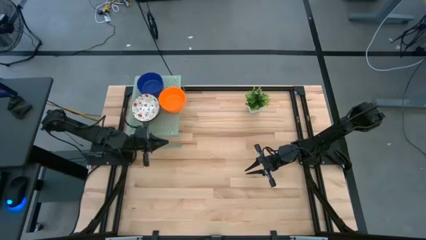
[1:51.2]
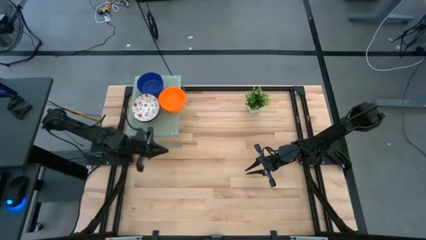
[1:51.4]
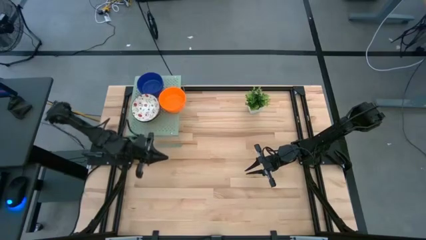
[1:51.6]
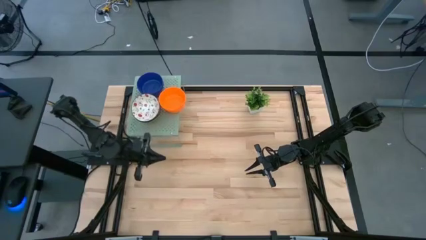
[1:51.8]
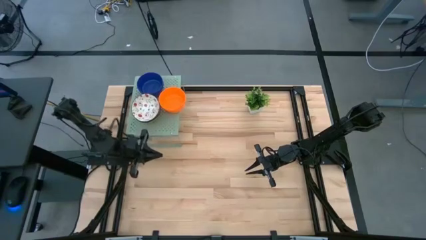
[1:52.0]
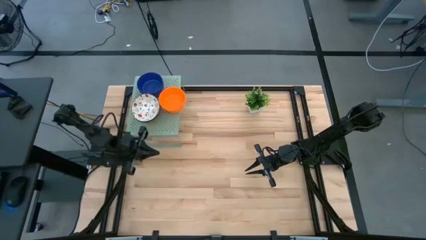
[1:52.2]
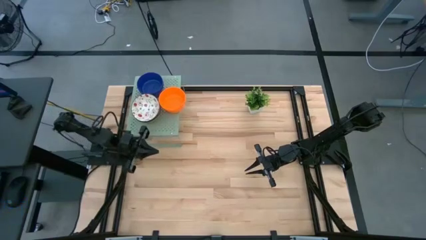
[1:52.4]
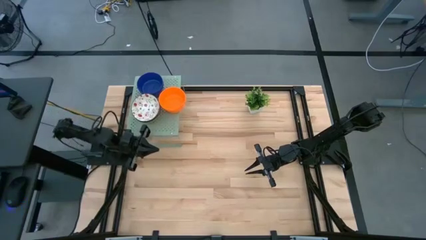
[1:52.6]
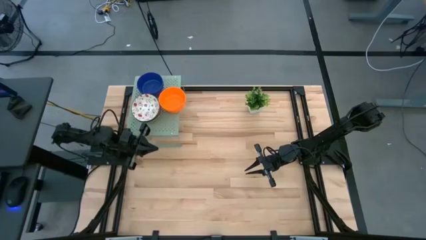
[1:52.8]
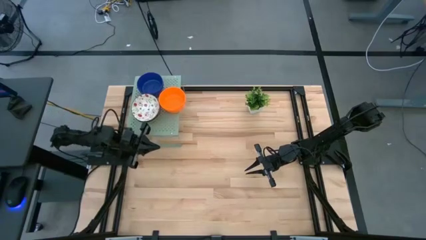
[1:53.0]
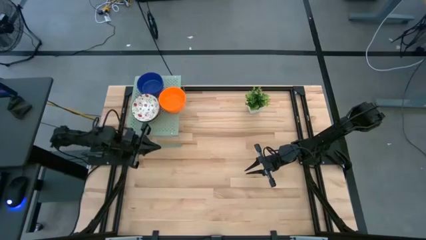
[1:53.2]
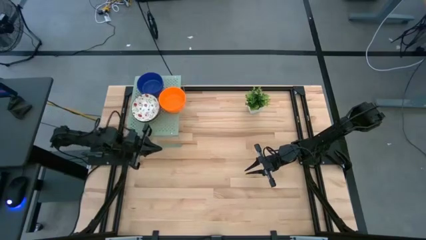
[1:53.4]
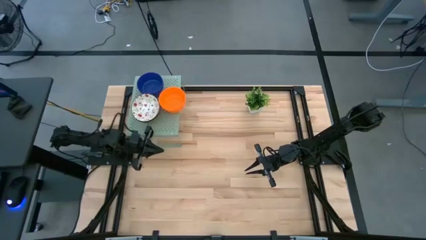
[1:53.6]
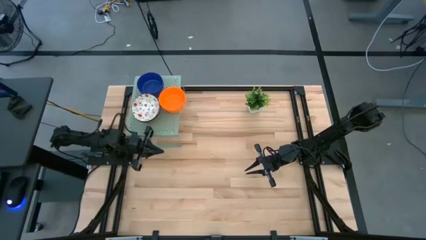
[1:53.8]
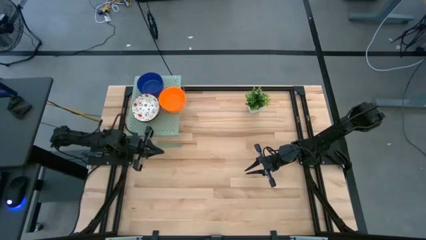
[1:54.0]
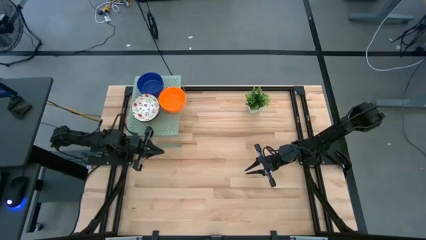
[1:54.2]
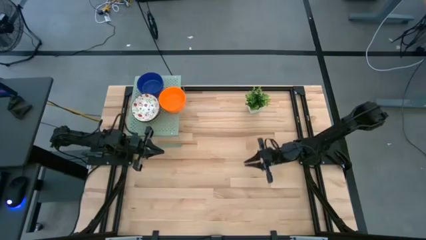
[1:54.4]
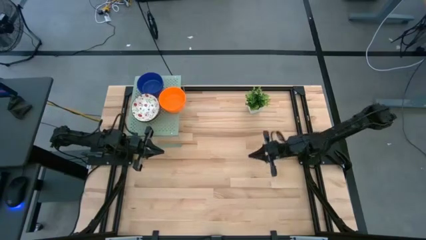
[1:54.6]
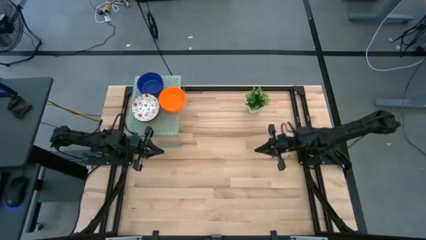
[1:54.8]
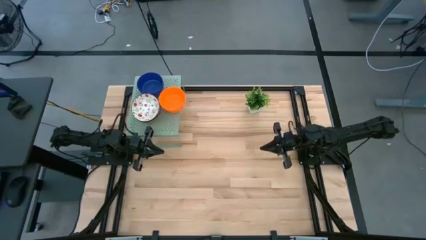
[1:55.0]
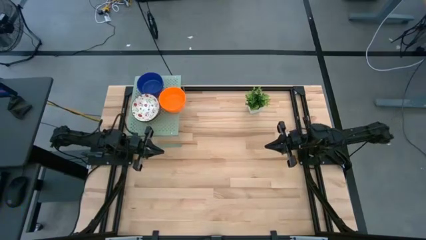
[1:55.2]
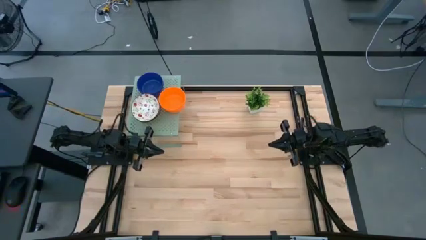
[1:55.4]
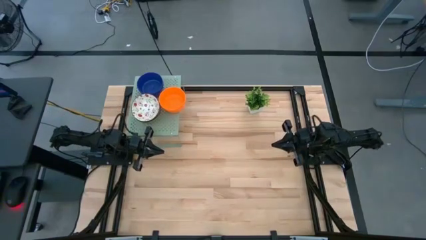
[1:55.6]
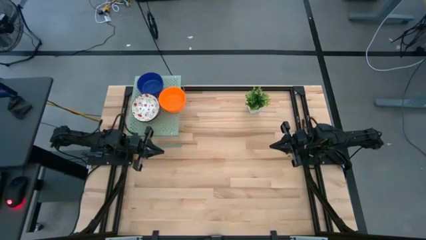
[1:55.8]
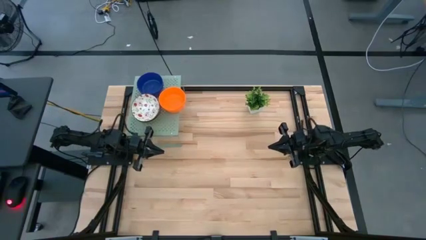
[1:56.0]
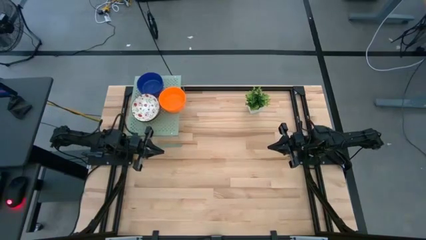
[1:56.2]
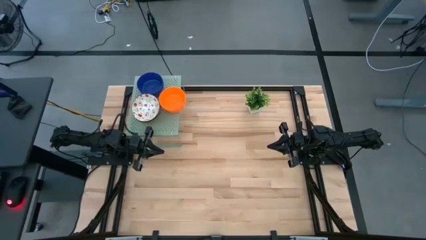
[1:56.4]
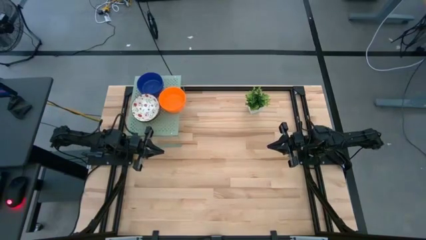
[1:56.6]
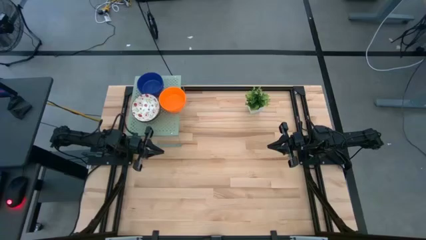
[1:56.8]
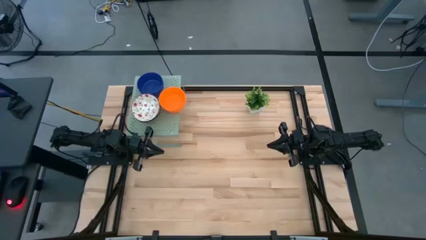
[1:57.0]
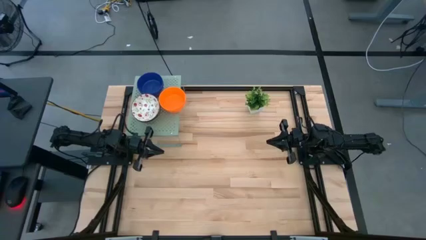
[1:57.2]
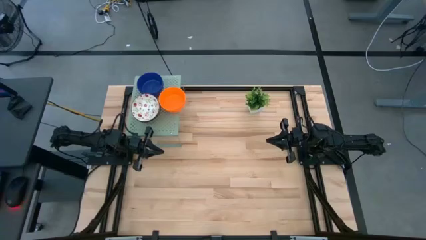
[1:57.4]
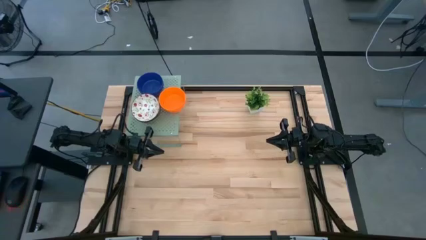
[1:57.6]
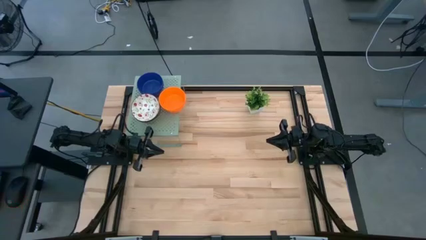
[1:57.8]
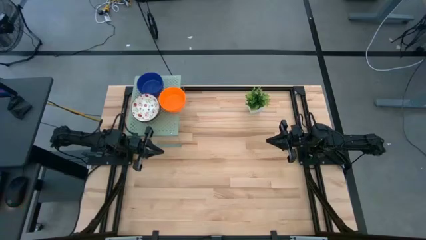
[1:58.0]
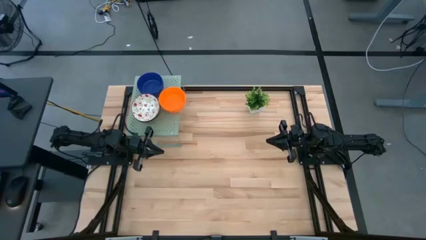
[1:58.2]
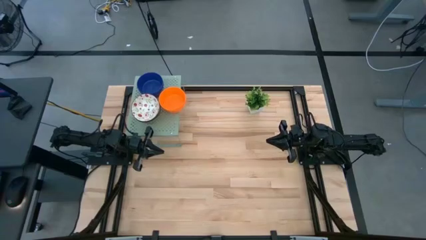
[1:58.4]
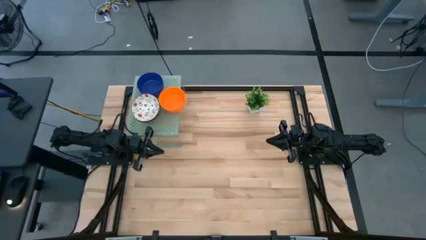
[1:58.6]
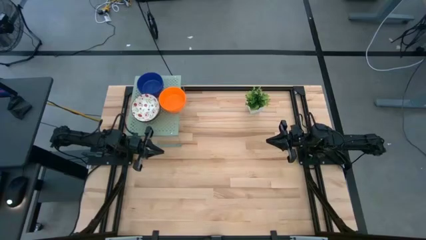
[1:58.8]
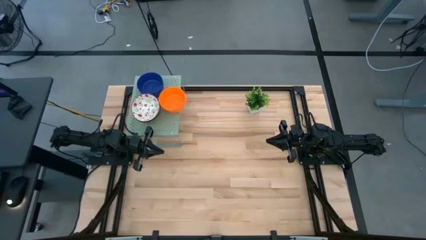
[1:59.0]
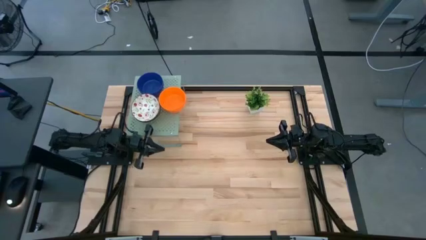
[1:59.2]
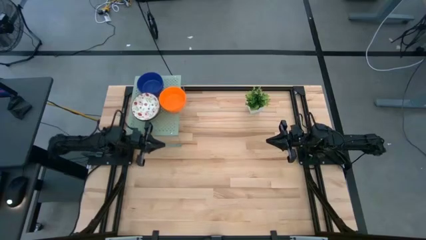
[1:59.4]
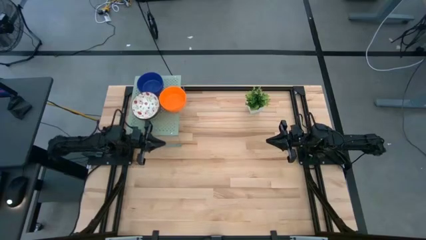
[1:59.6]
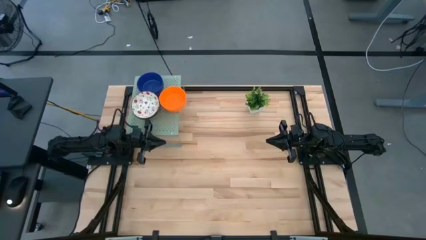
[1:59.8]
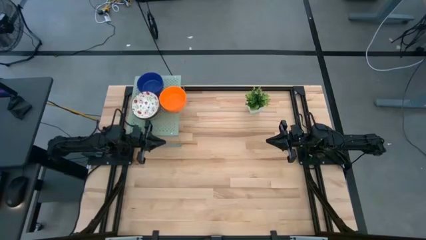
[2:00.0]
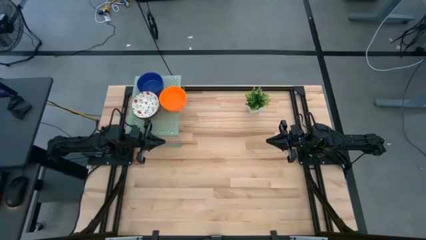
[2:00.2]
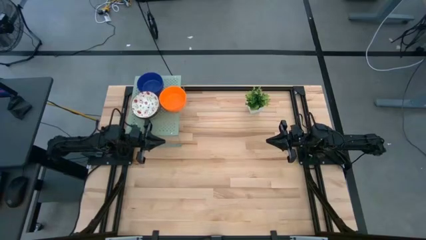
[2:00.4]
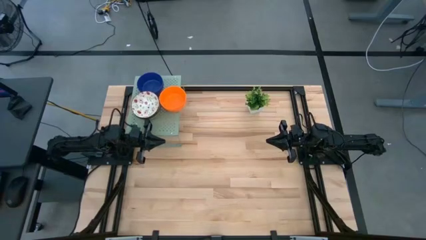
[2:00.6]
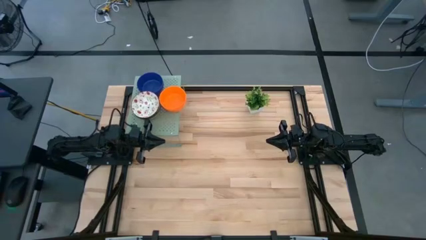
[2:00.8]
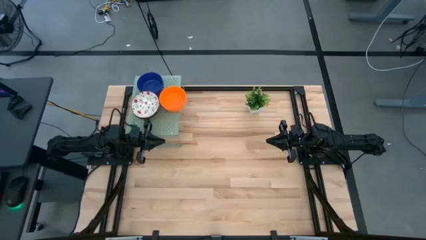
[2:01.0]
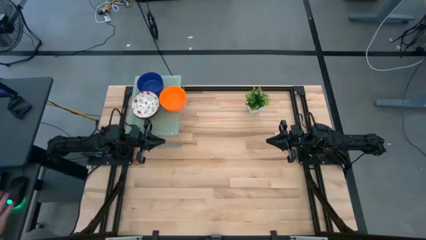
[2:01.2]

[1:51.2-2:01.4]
Task: Pick & Place Mini bowls
Return to Home Position
